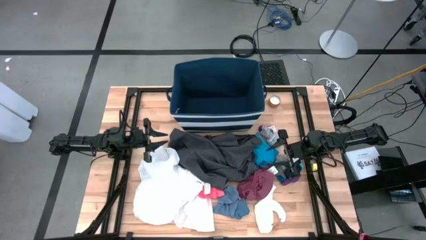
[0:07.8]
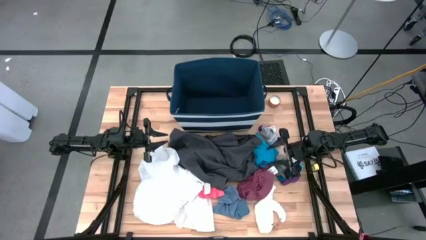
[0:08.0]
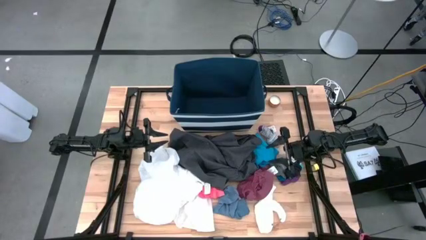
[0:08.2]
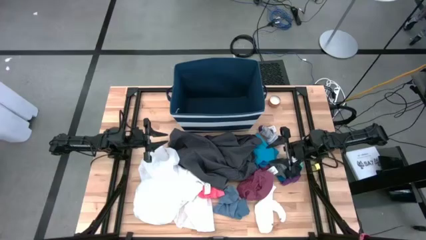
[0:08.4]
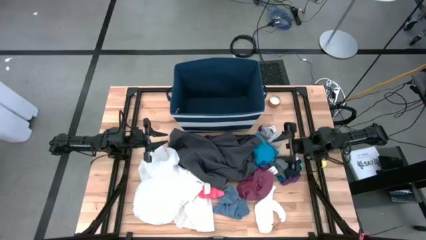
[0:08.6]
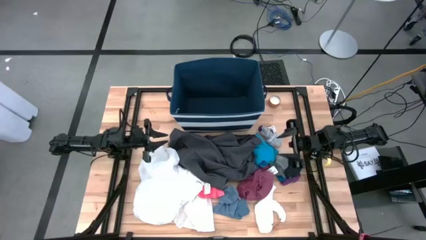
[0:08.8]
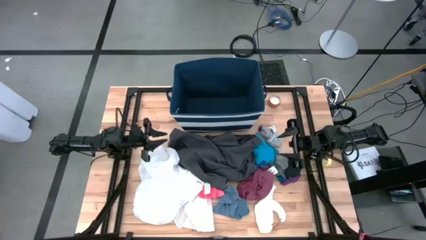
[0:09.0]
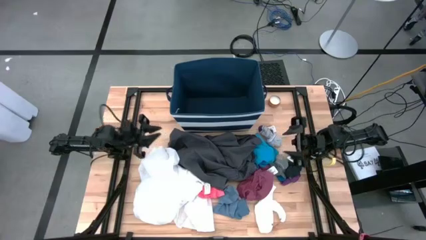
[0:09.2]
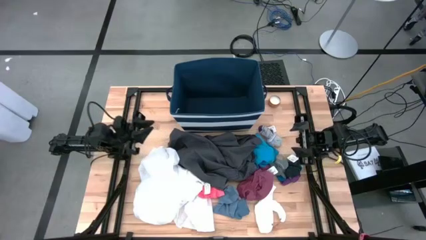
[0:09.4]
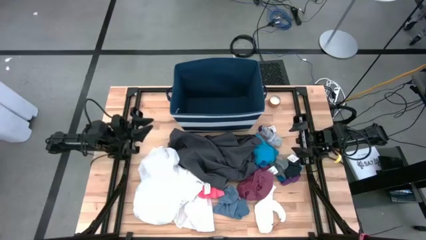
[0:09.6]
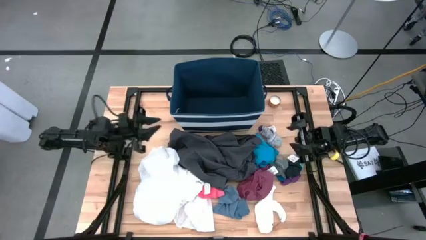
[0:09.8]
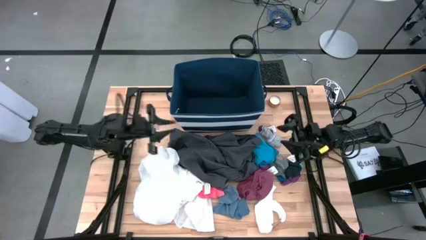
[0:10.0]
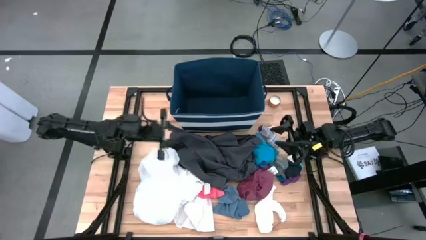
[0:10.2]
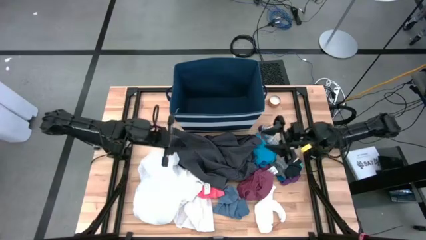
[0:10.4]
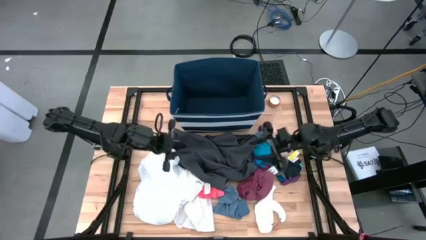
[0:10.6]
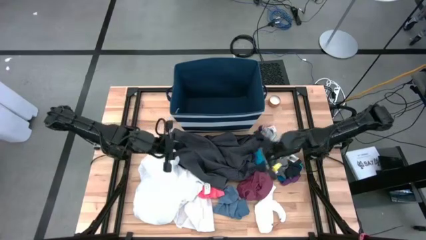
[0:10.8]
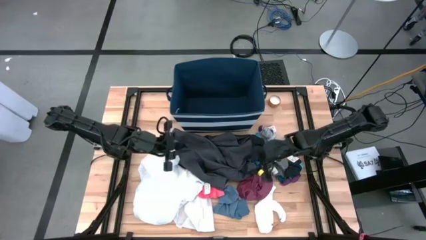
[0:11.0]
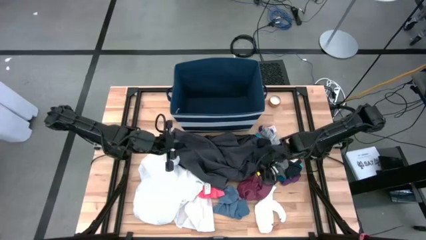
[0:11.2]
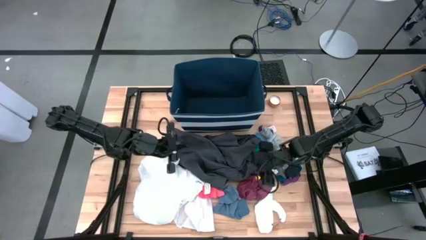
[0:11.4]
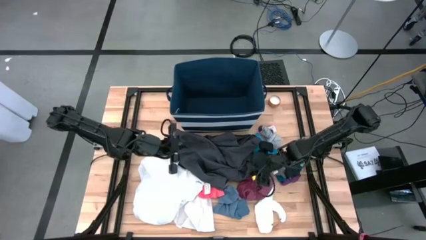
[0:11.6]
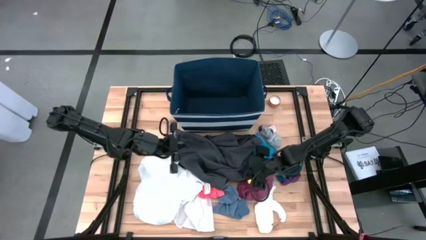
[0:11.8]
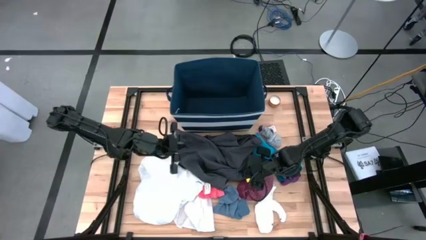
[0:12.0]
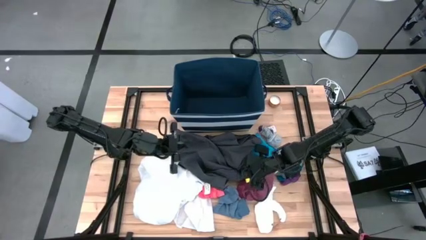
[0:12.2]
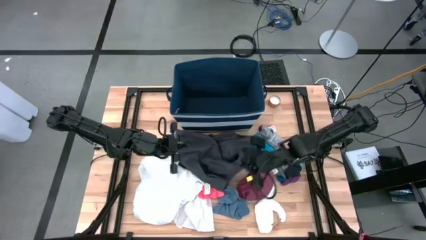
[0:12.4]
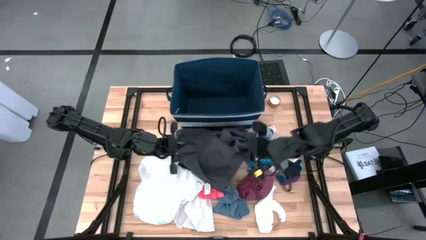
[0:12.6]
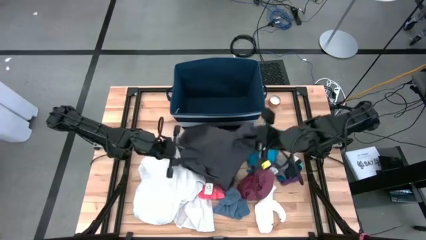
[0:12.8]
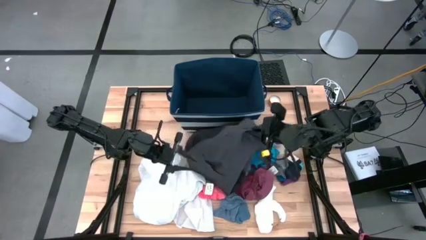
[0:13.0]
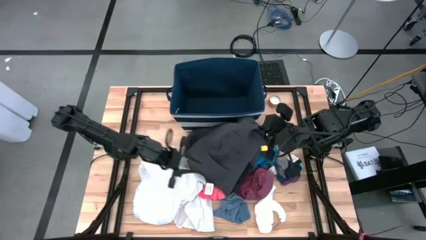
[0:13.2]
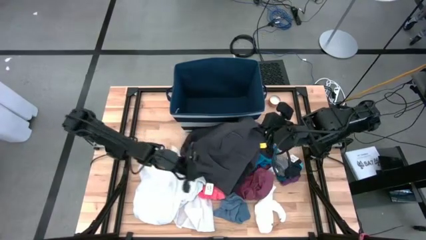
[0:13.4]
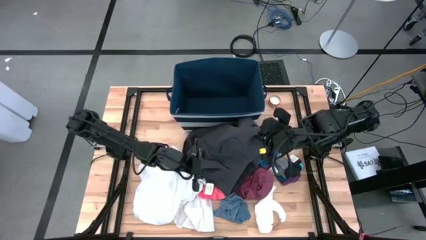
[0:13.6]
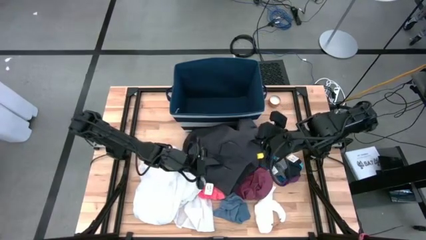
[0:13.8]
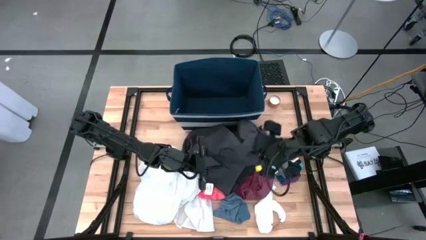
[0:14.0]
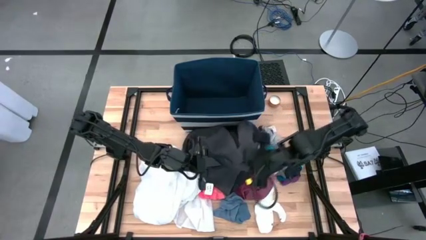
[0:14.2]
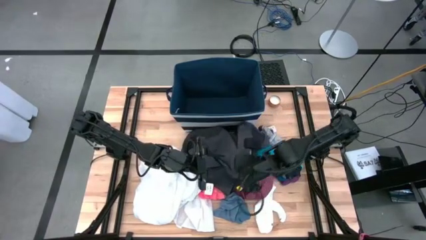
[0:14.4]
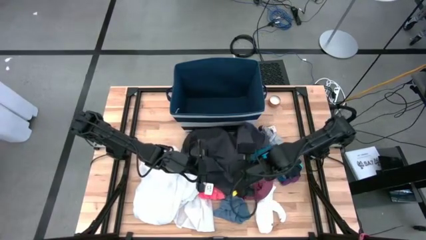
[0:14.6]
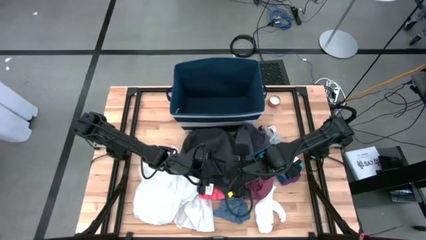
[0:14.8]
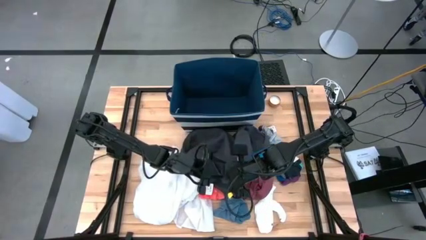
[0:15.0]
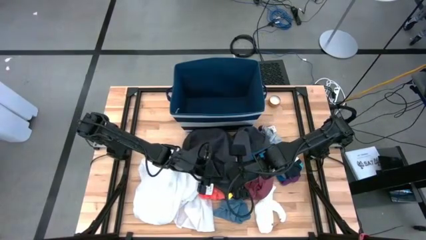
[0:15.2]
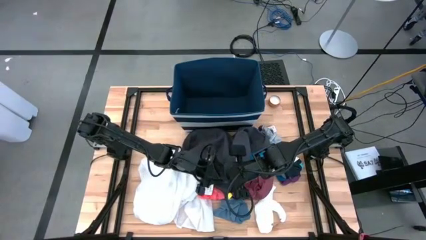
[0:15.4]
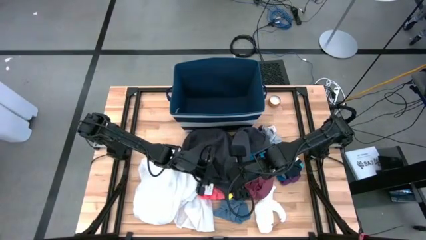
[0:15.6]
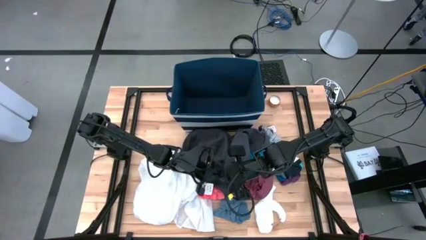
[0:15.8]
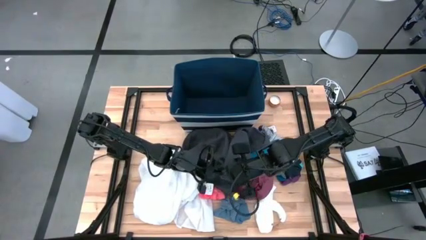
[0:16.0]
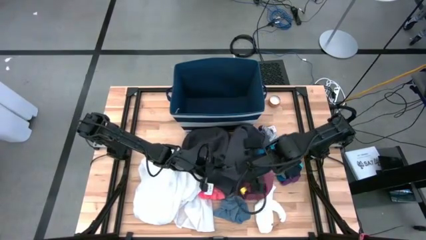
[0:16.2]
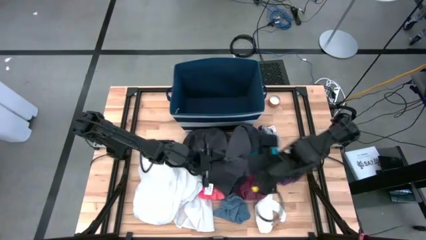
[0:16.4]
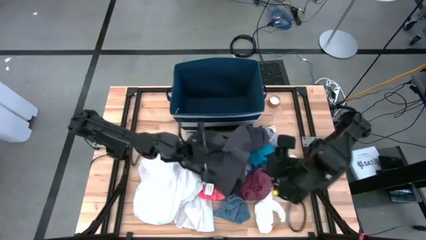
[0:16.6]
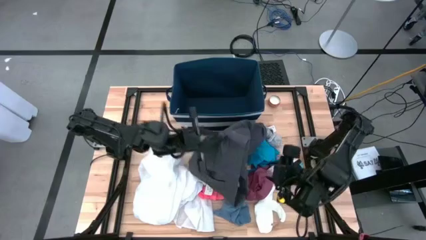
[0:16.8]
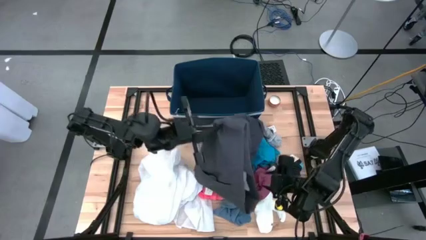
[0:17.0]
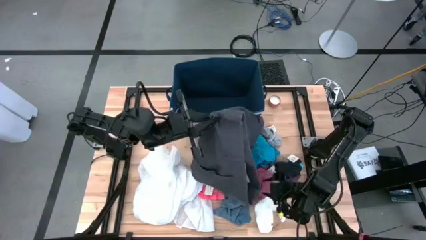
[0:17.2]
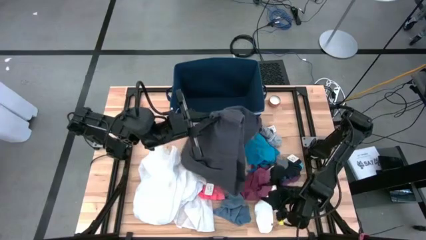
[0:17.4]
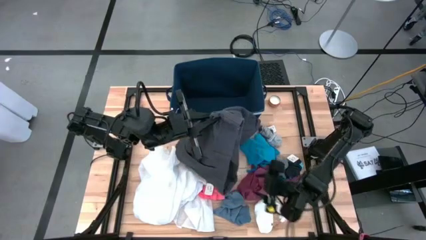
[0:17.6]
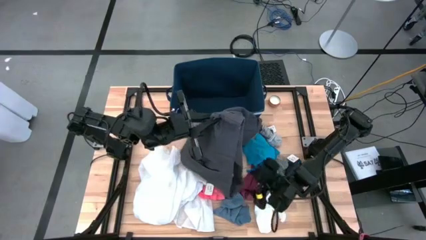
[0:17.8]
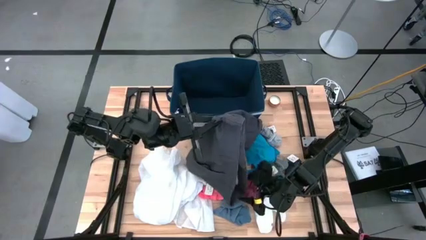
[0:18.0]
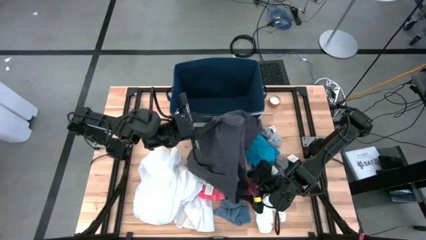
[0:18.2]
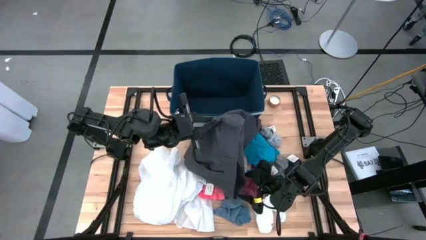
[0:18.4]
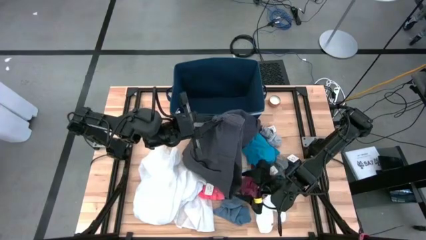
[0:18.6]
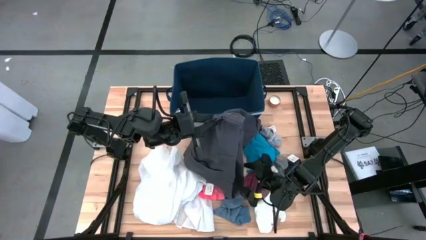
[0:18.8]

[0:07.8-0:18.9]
Task: Sort clothes
Put the gray shorts into the blue laundry organizer
